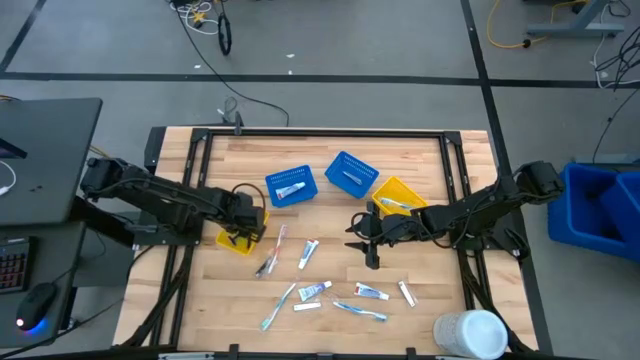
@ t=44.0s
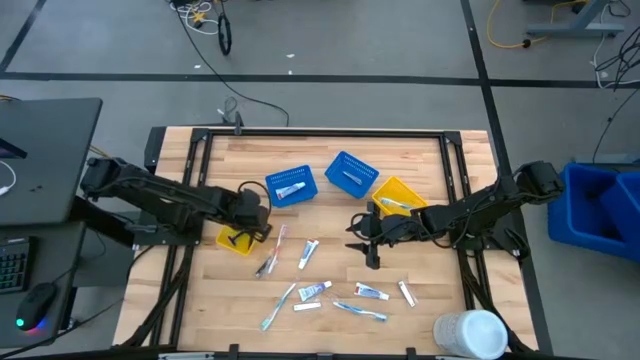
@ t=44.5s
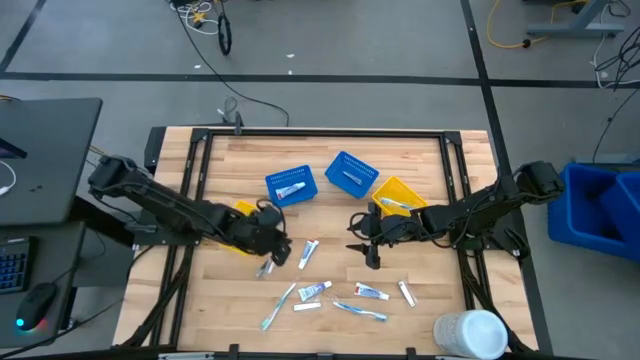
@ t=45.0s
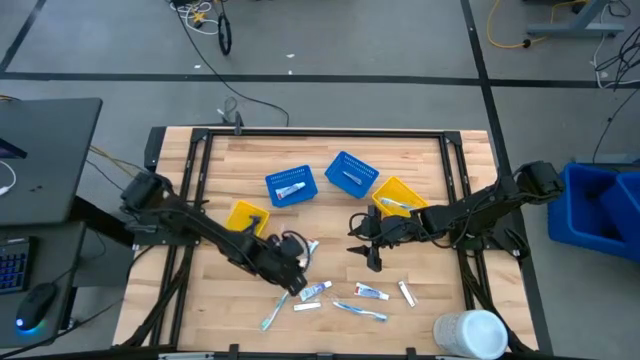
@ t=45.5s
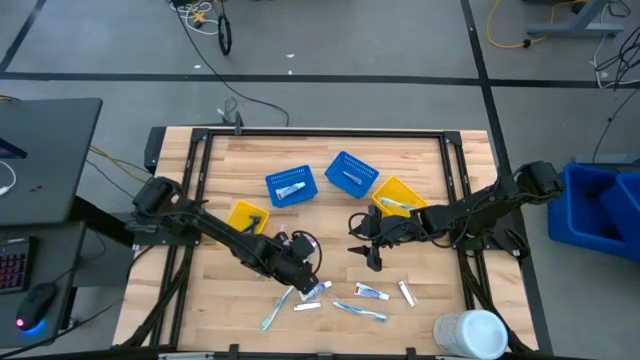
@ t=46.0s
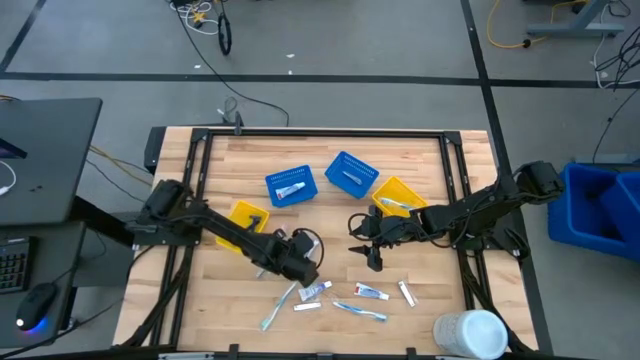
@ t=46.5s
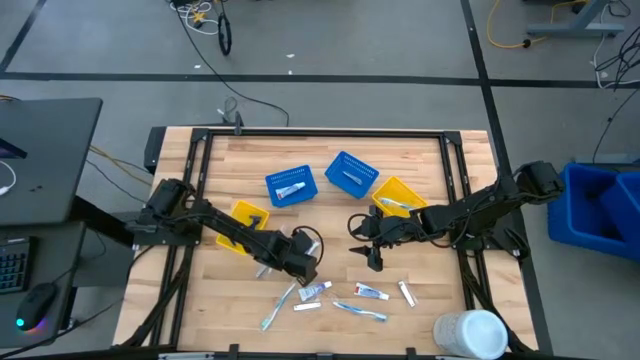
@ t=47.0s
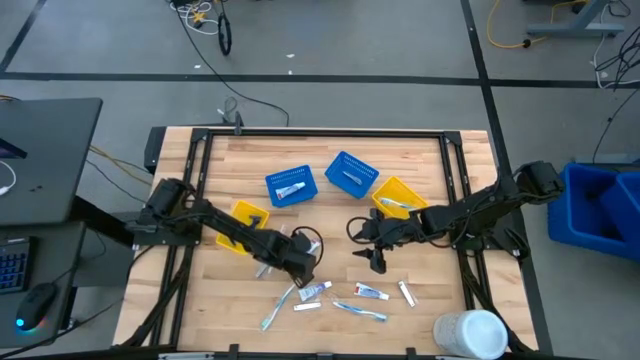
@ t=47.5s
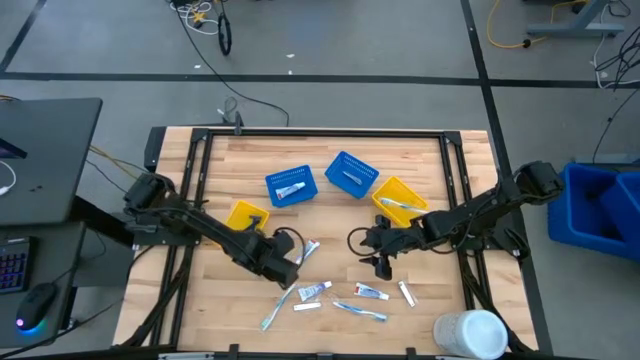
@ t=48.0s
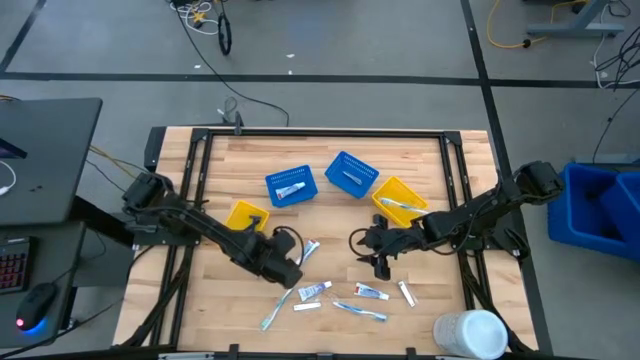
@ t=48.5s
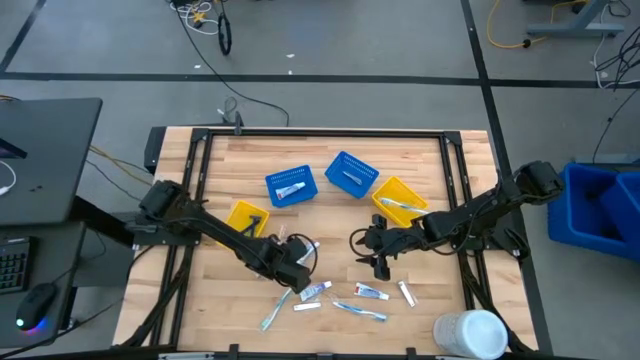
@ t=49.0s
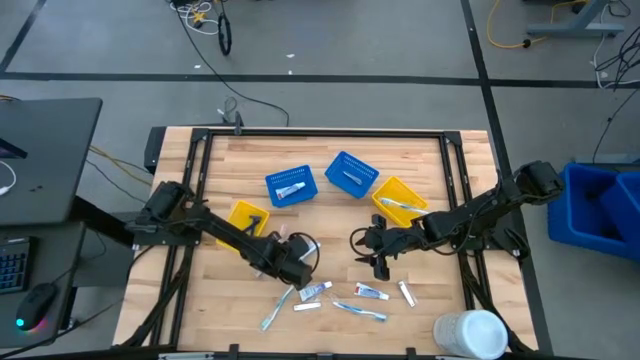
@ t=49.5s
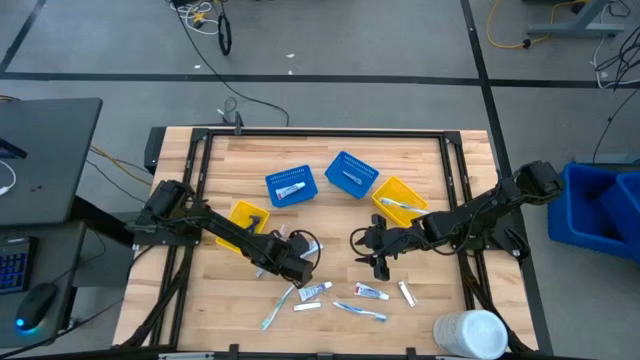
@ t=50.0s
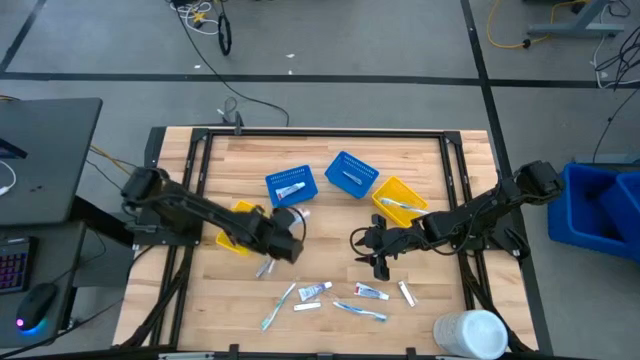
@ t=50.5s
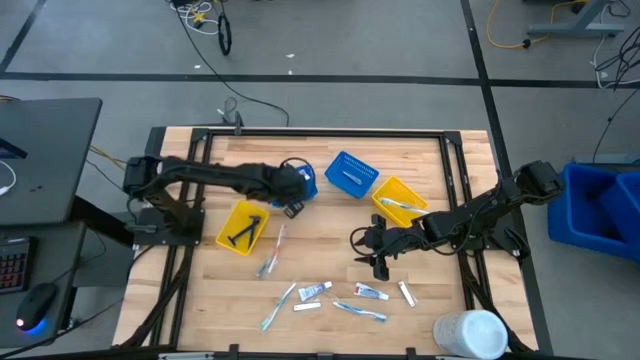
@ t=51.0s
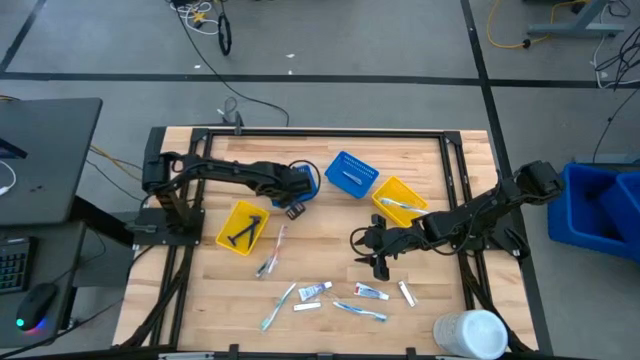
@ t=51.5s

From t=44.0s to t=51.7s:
Task: Pick & Place Travel size toiletries
Put the white toothpaste into the left blue bin

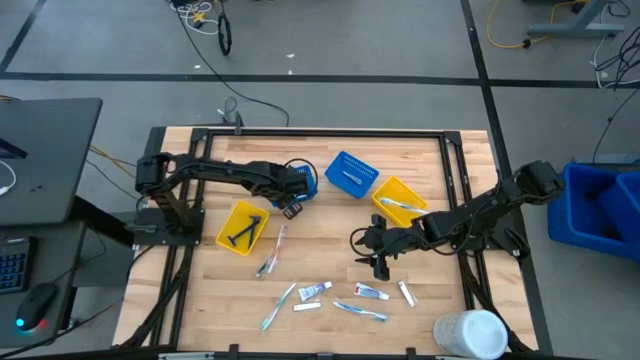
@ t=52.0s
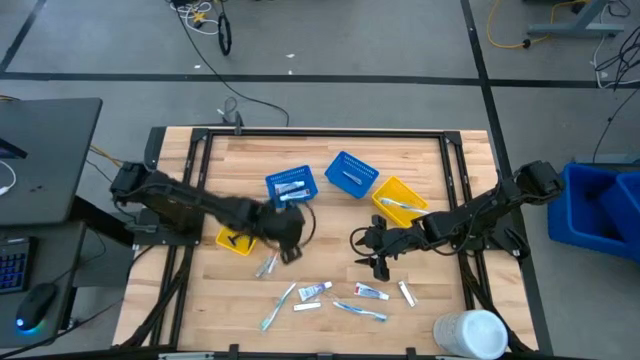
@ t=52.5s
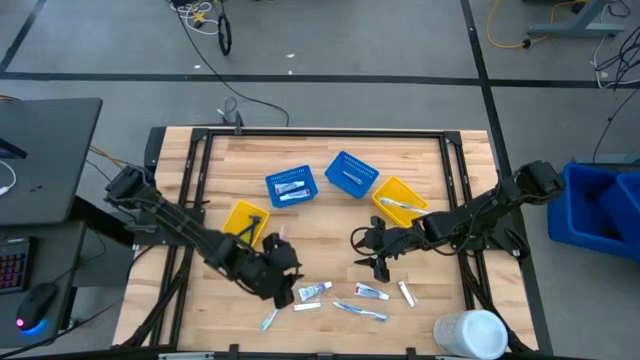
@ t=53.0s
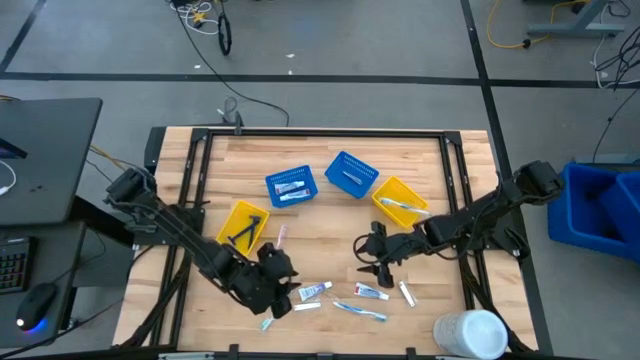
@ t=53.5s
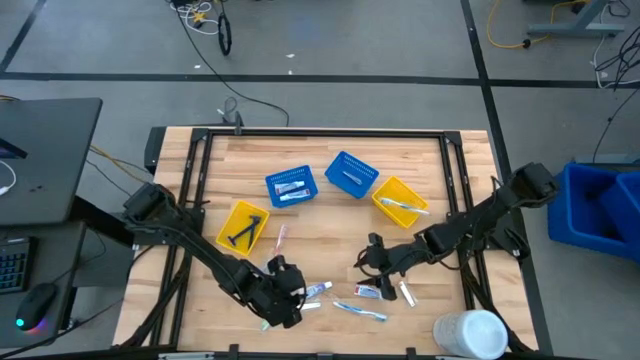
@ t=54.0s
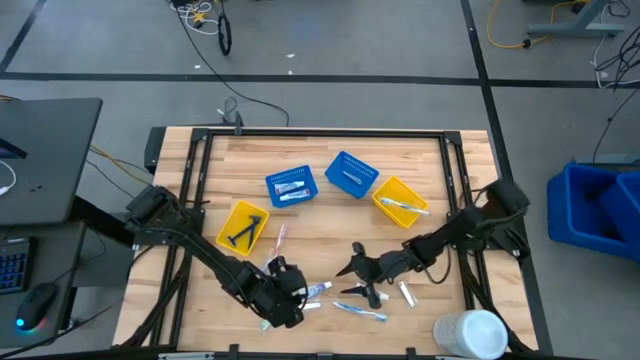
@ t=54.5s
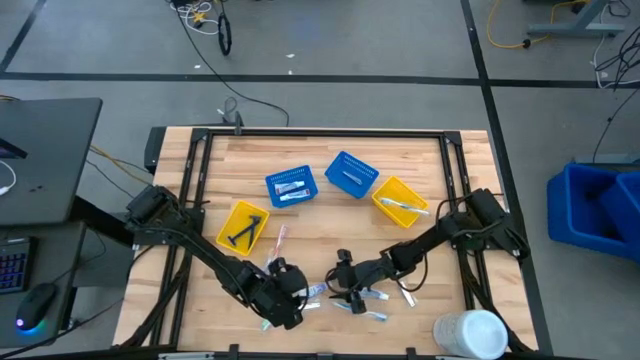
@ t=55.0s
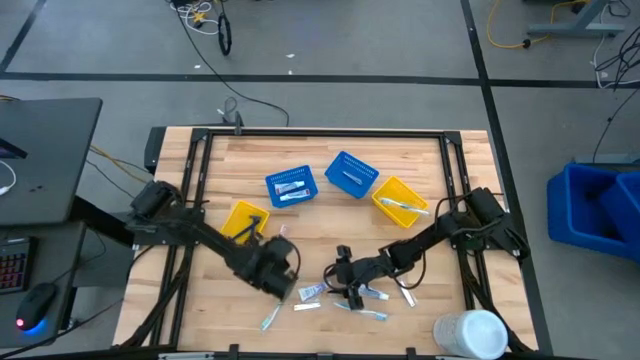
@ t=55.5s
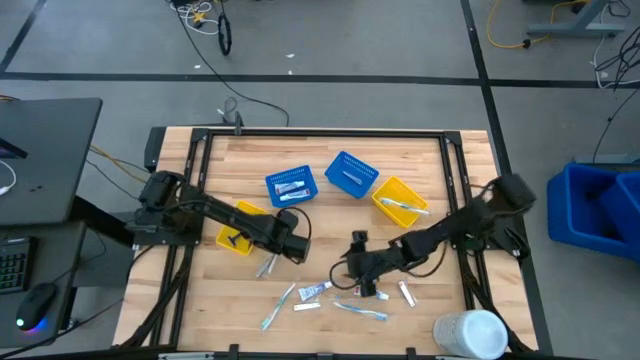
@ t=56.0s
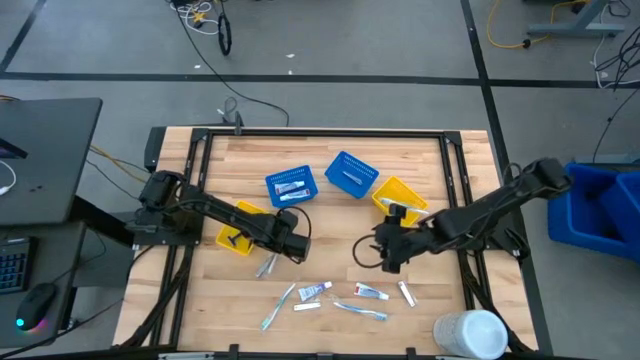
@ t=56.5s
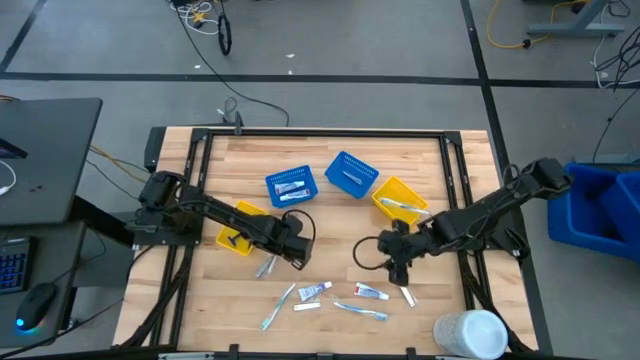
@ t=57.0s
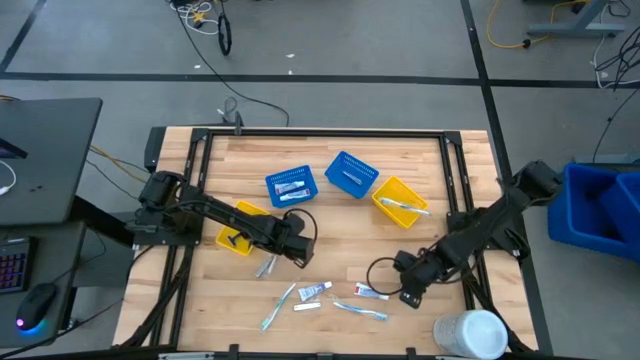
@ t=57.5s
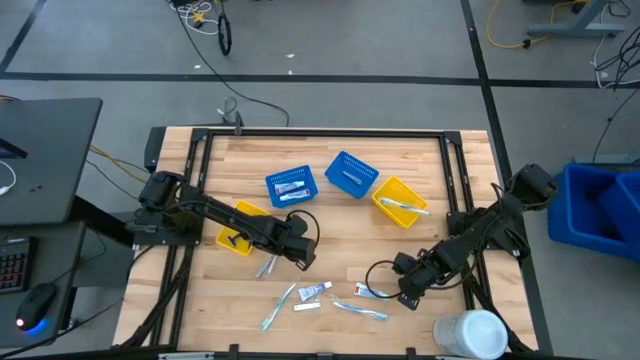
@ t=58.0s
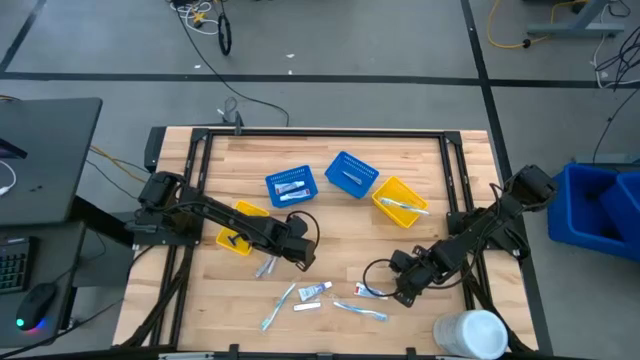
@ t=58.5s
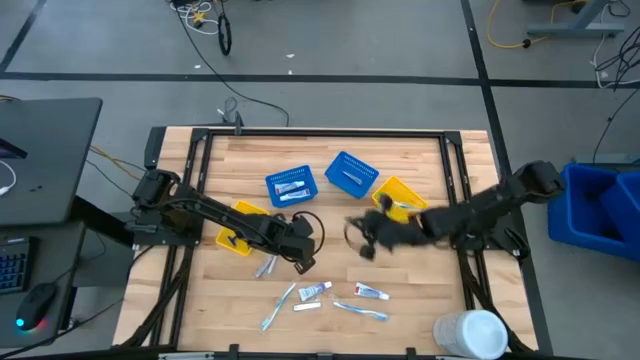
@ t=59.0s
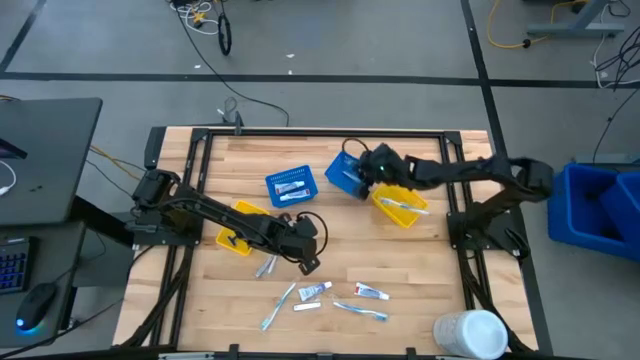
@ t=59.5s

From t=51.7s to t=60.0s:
Put the silver nail cutter into the right blue bin

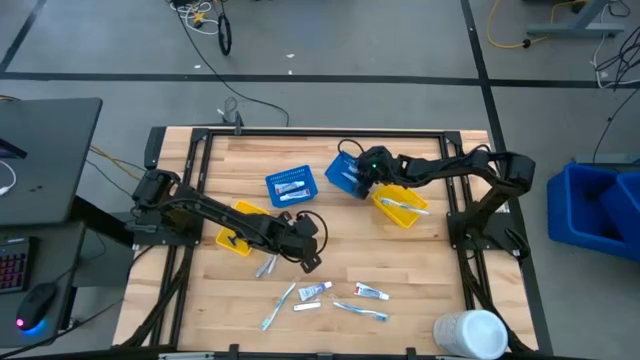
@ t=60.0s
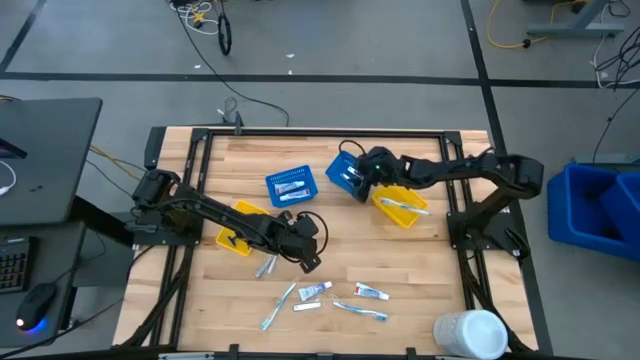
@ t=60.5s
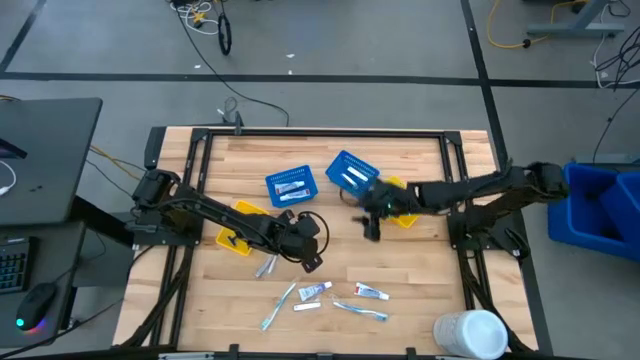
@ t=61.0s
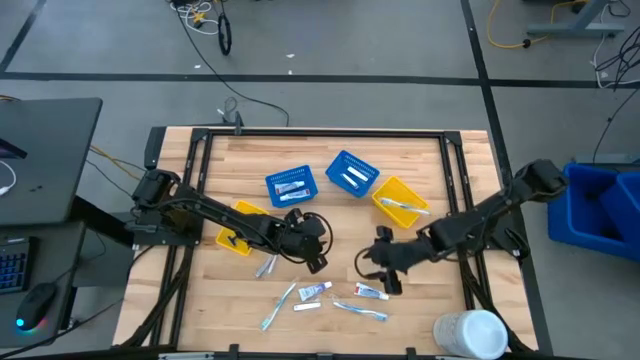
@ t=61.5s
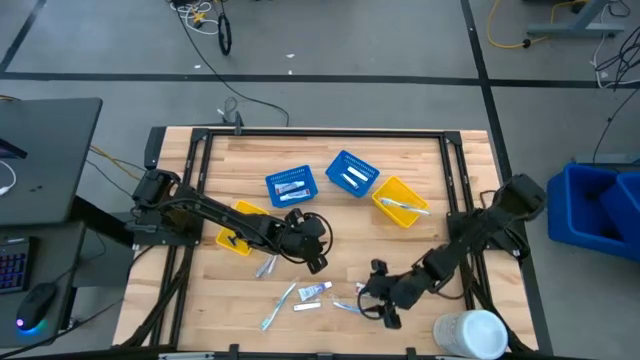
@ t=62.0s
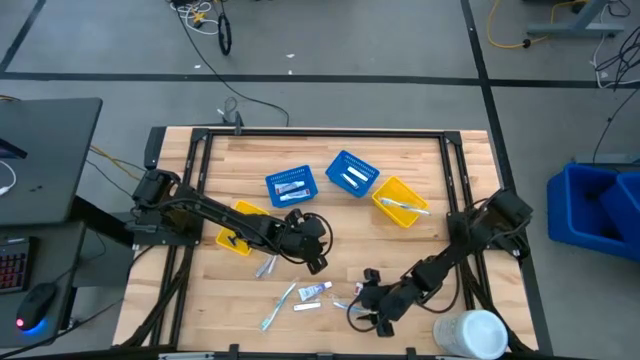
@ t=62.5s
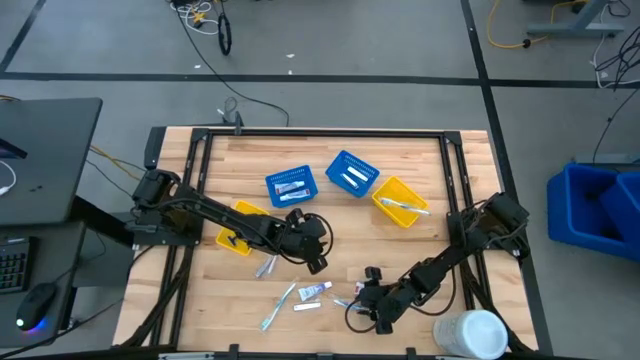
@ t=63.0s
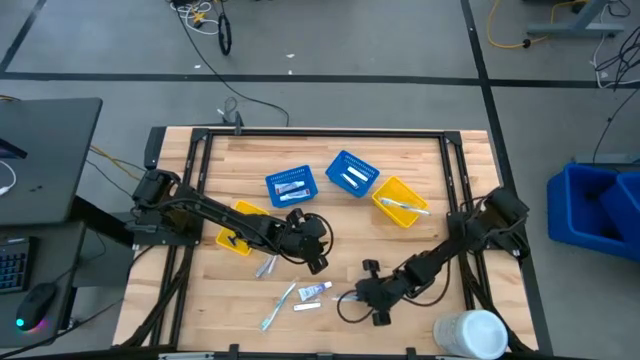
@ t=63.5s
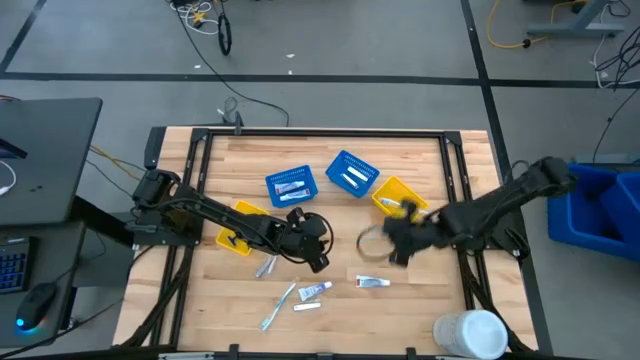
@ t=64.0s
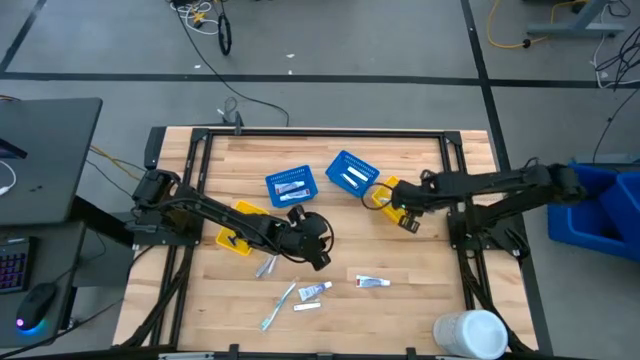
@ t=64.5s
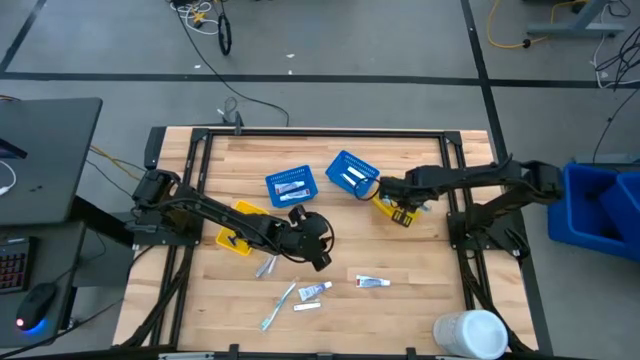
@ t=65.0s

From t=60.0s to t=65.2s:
Put the blue toothbrush into the right yellow bin
